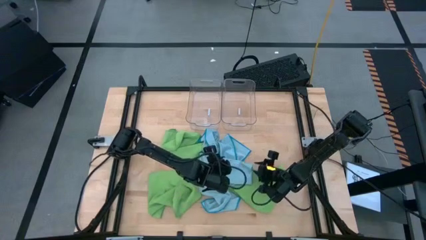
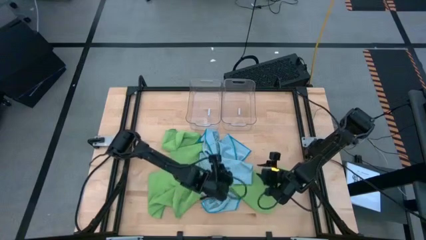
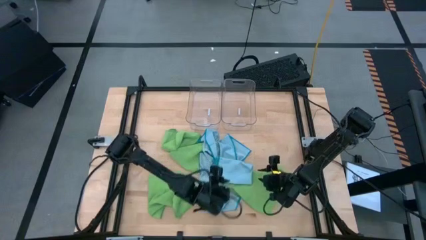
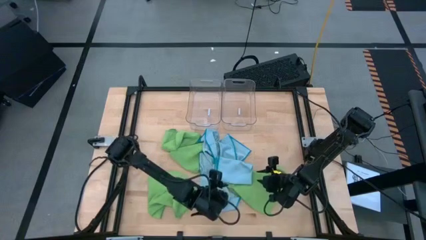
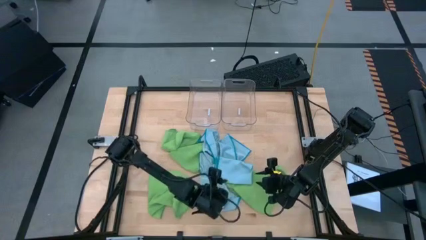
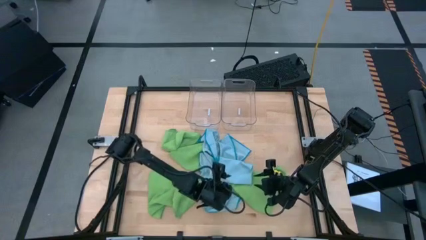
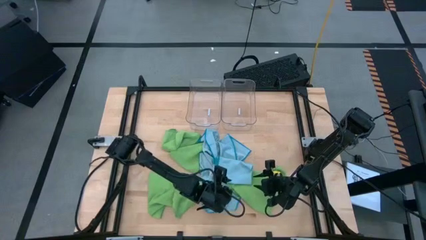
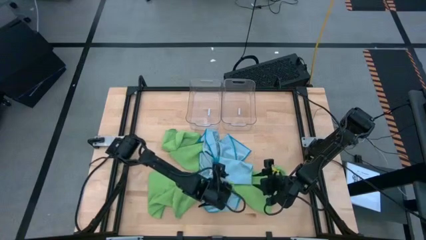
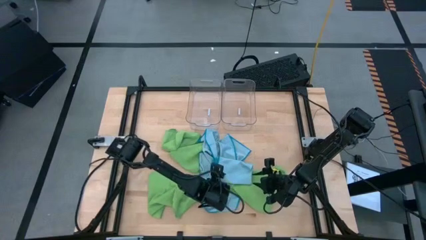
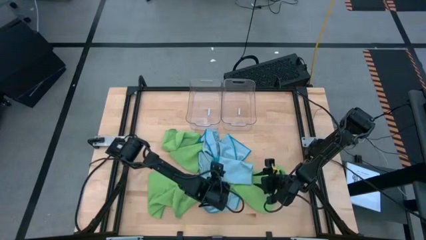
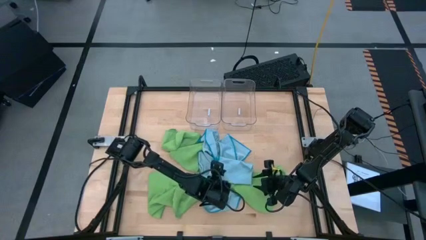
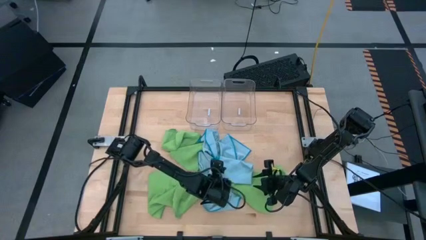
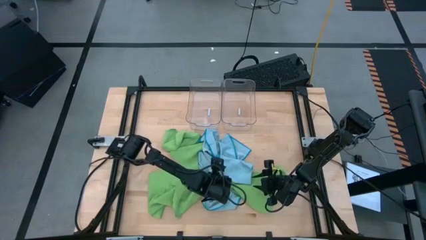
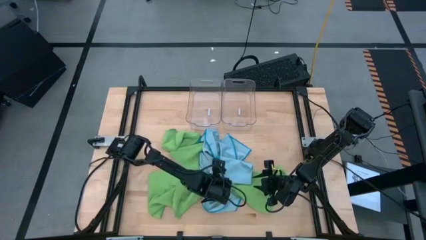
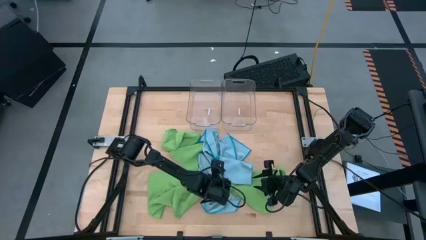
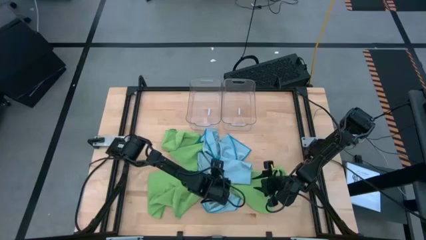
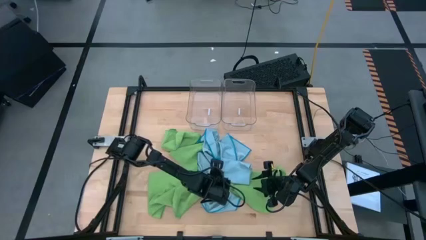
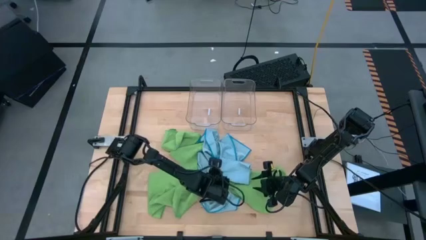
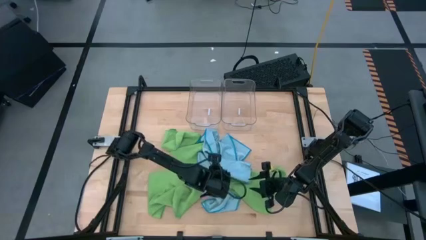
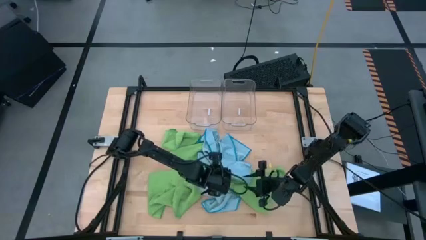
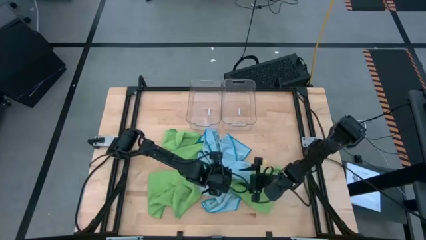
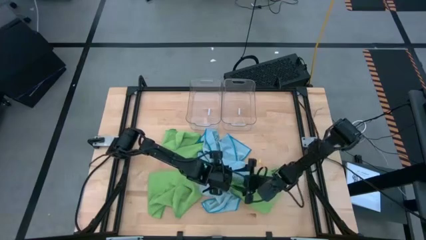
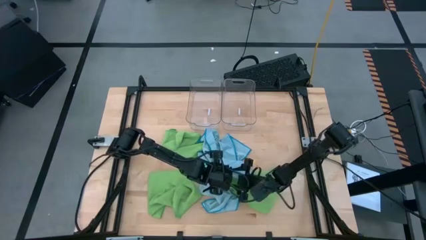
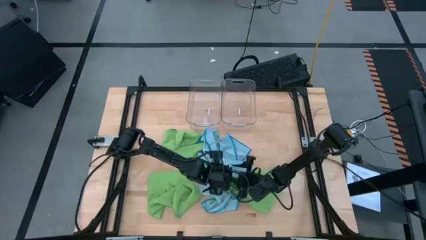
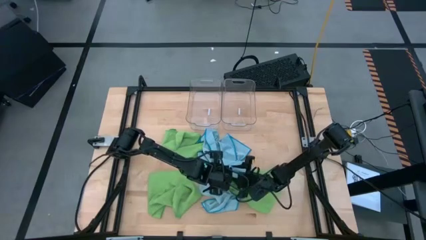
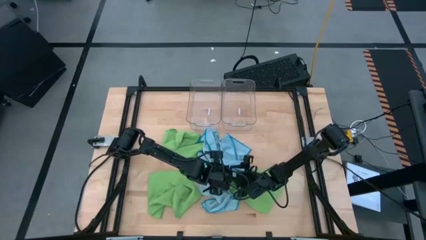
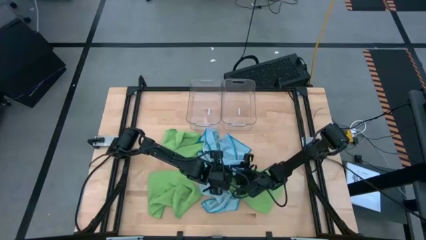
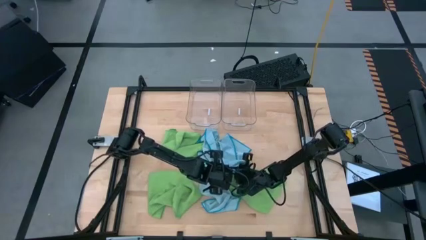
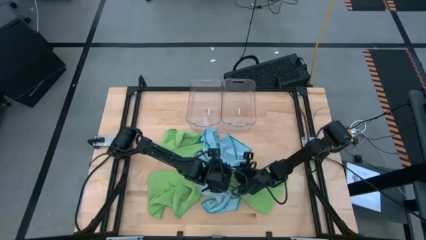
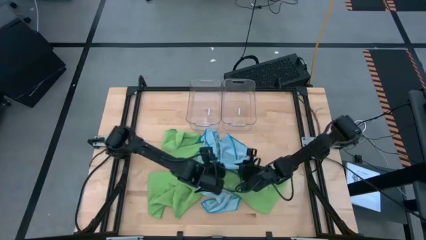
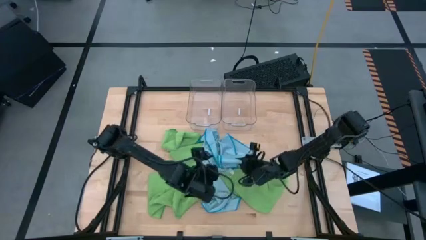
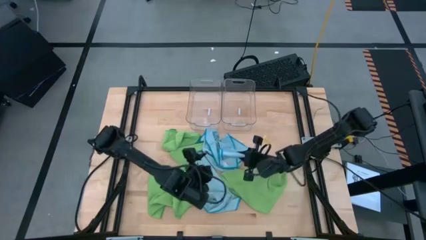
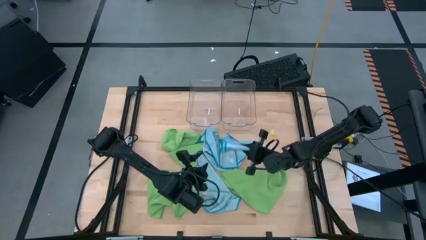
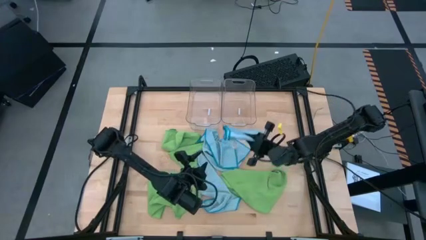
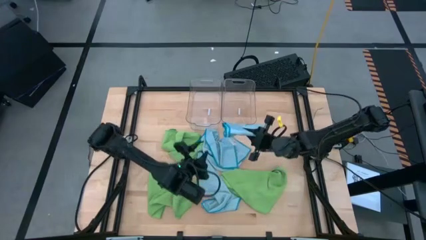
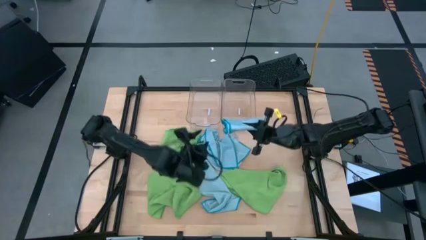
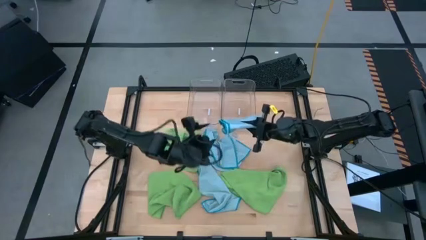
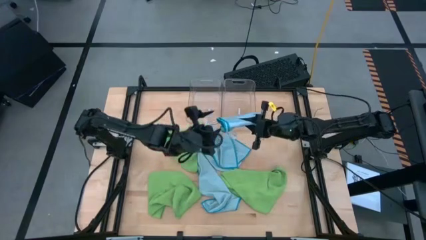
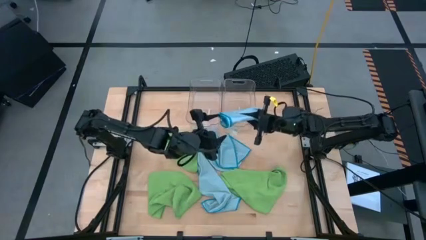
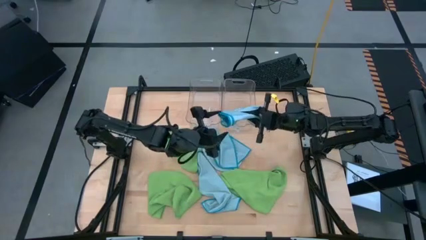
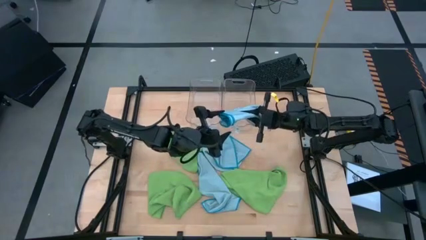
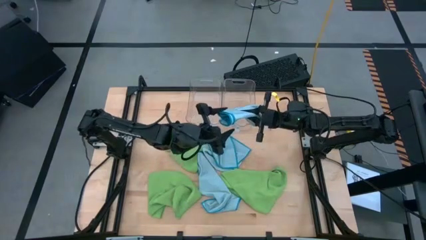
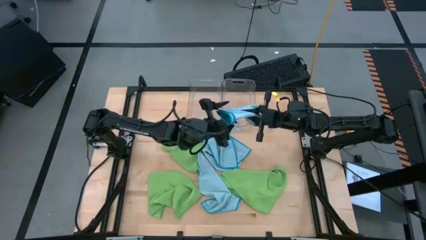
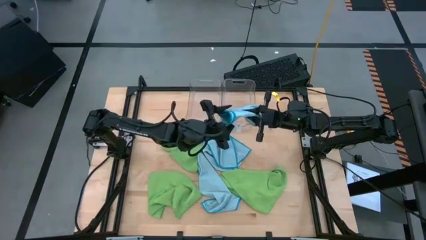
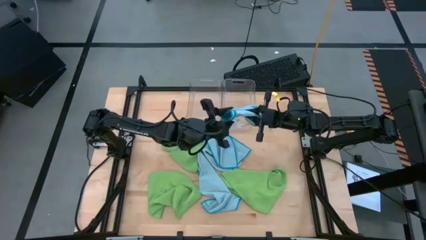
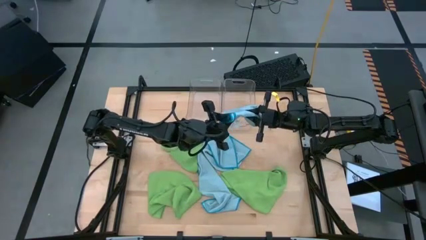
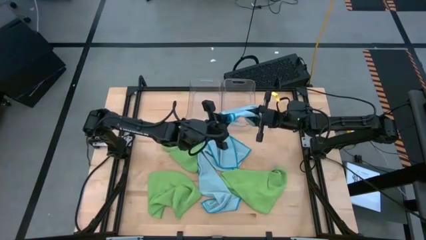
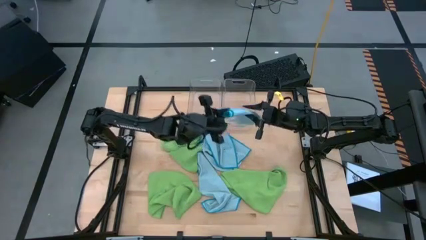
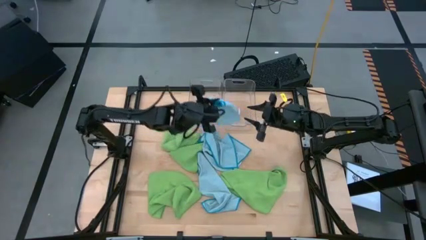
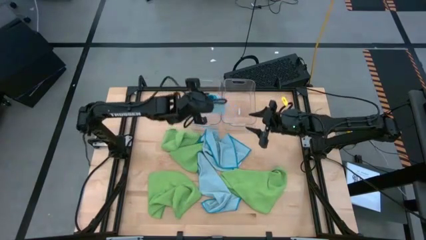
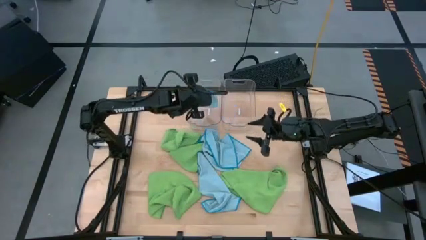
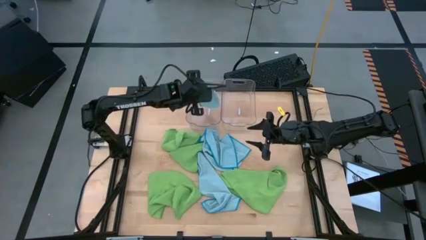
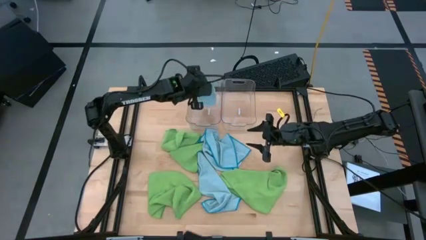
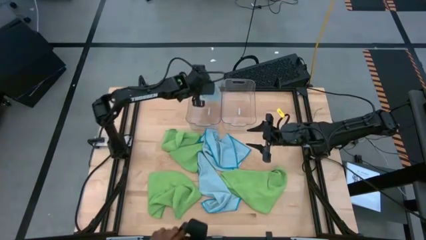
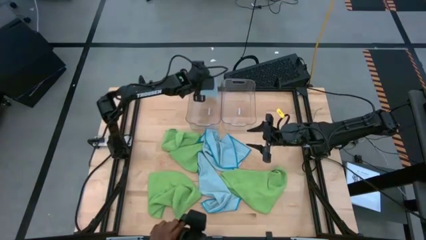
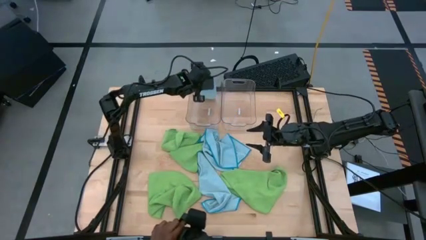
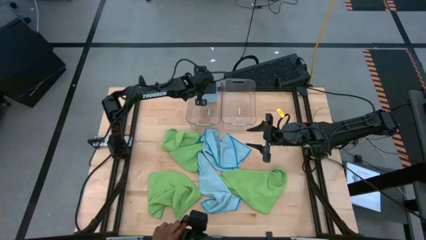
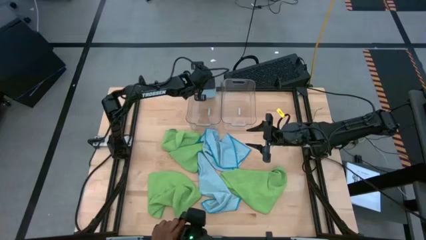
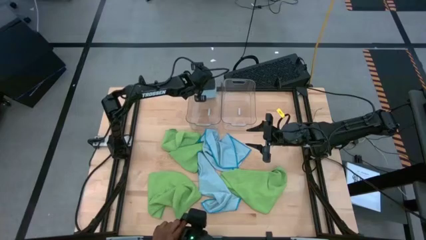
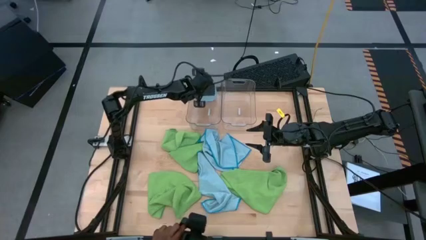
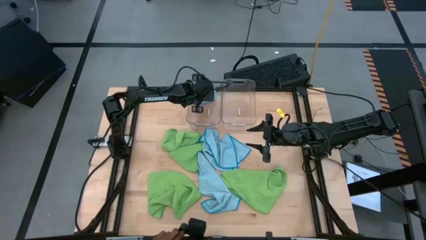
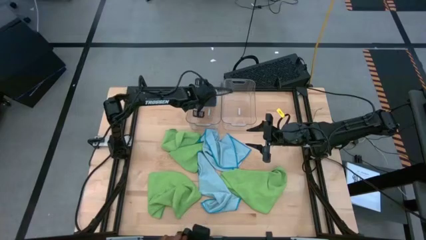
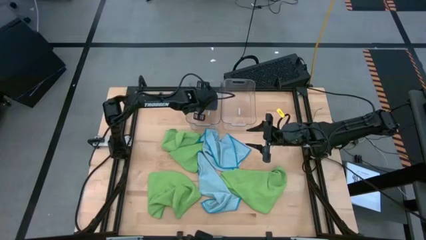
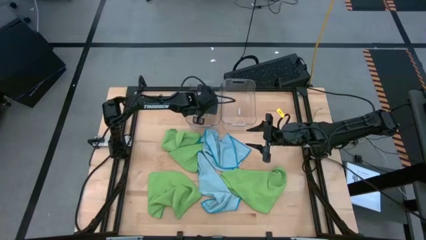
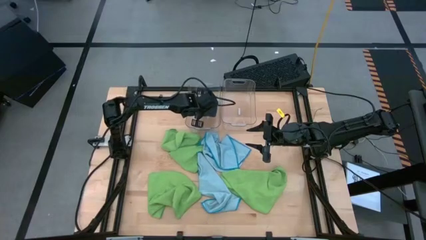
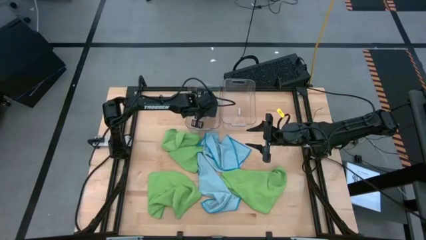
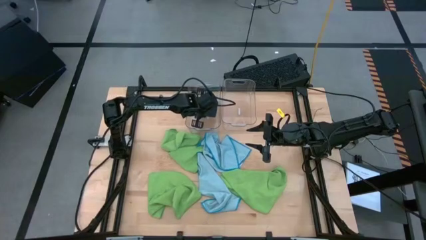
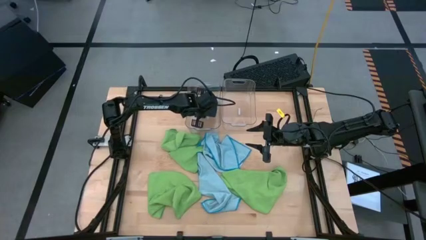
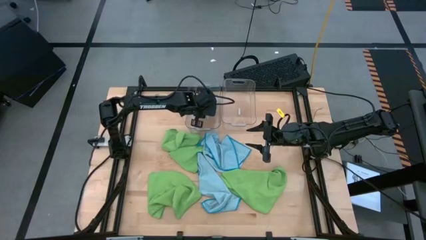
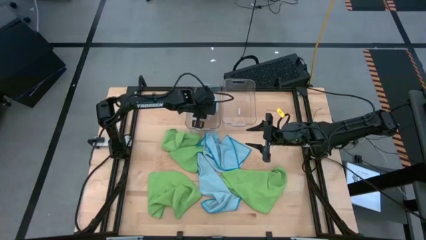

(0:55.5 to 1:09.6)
Task: Fold microfiber towels
Put the blue folded microfiber towel into the left transparent bin
